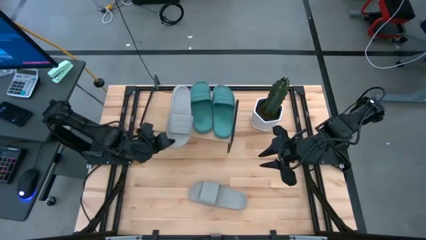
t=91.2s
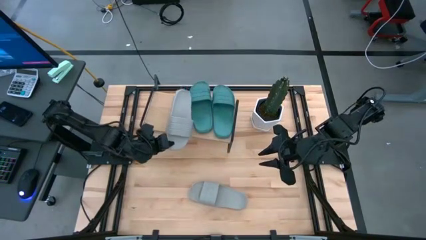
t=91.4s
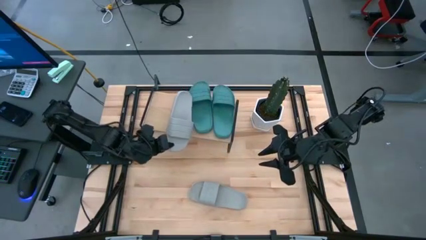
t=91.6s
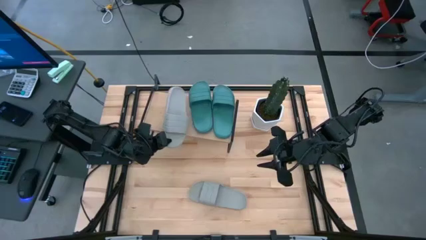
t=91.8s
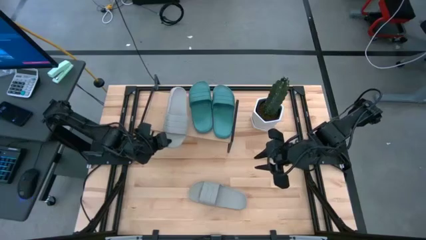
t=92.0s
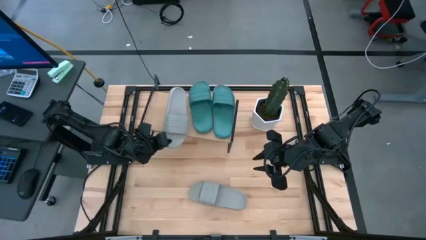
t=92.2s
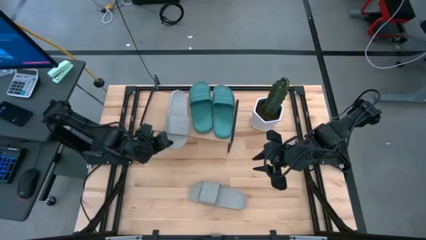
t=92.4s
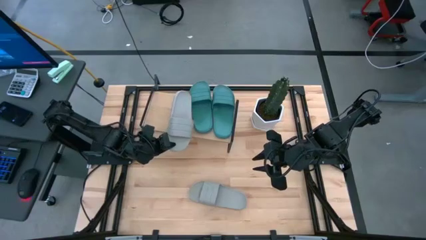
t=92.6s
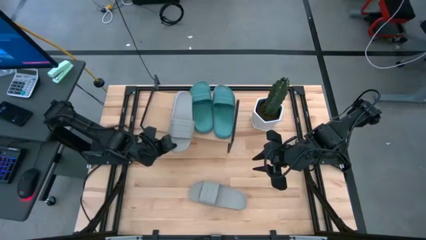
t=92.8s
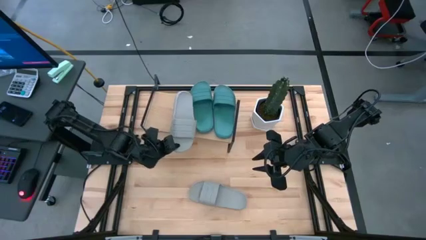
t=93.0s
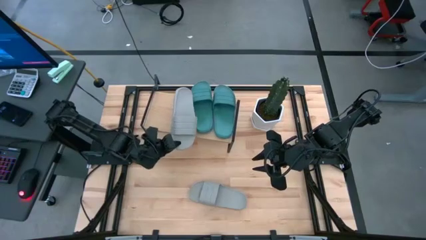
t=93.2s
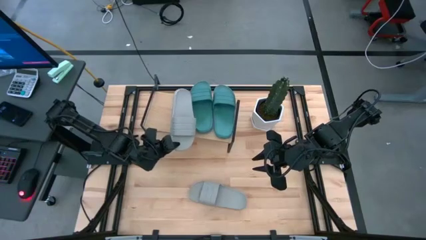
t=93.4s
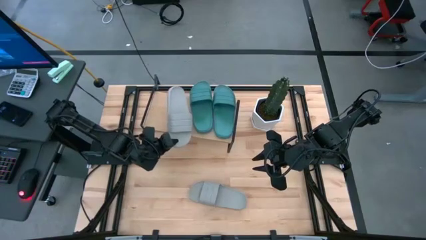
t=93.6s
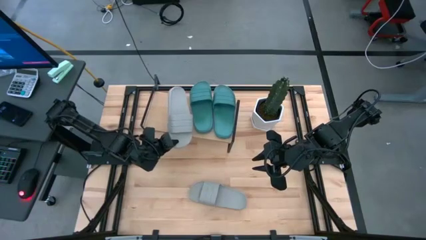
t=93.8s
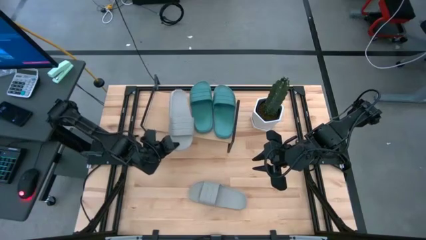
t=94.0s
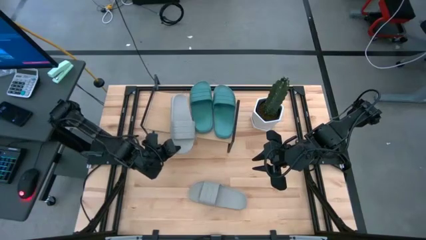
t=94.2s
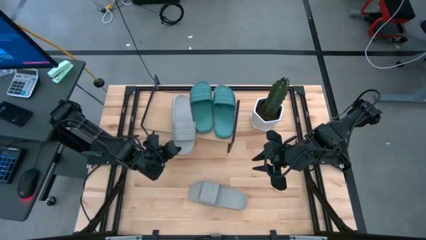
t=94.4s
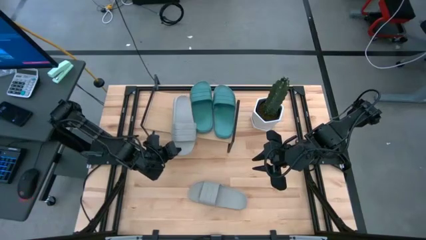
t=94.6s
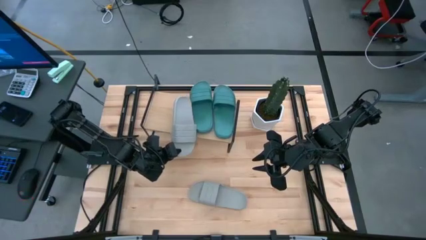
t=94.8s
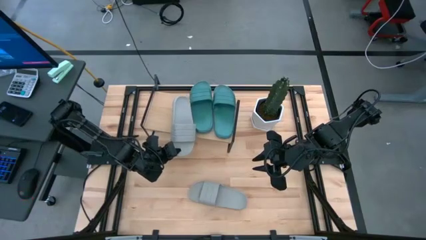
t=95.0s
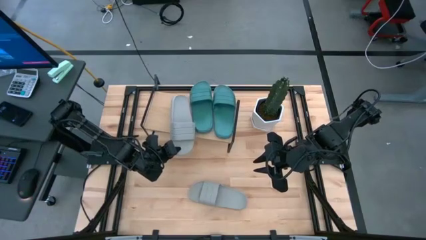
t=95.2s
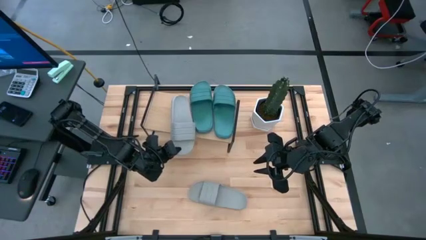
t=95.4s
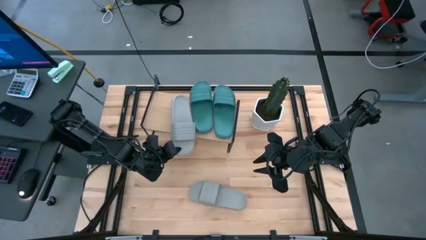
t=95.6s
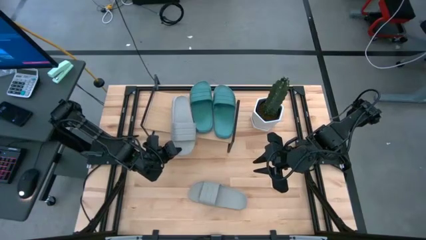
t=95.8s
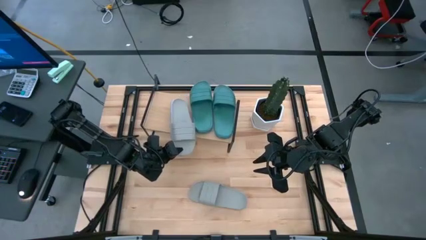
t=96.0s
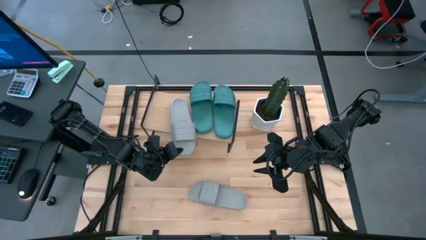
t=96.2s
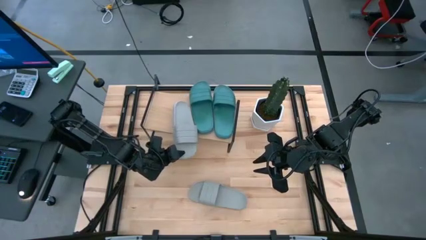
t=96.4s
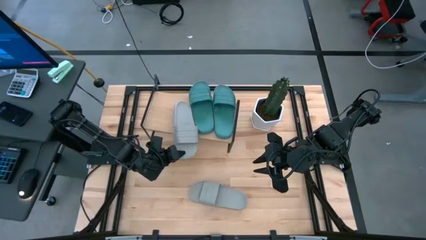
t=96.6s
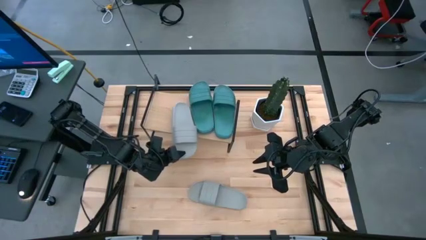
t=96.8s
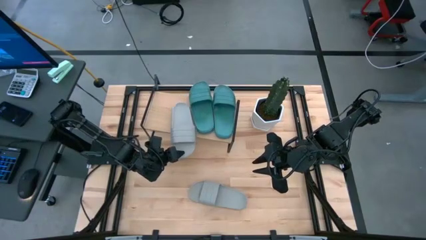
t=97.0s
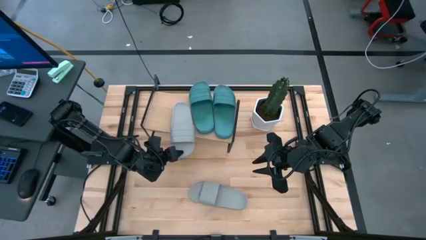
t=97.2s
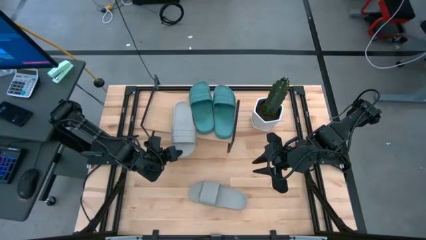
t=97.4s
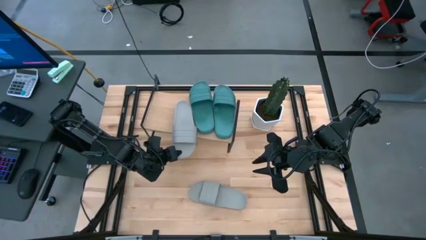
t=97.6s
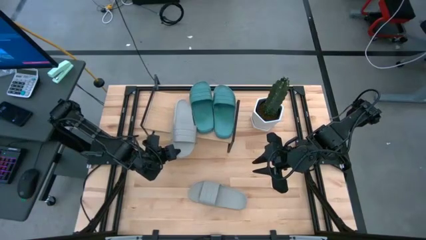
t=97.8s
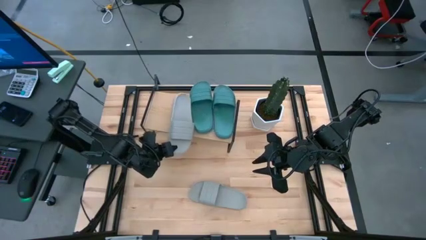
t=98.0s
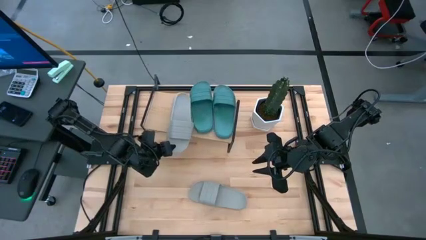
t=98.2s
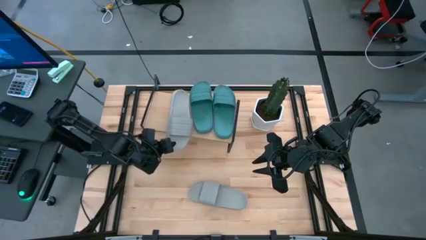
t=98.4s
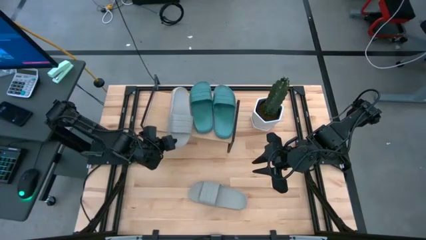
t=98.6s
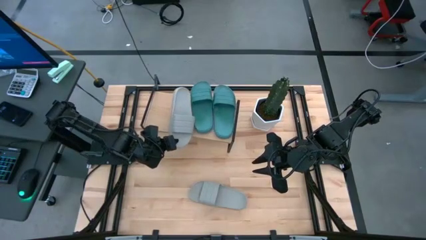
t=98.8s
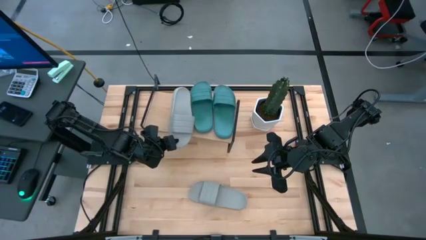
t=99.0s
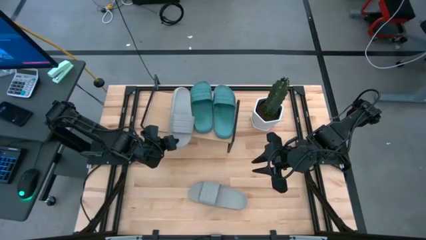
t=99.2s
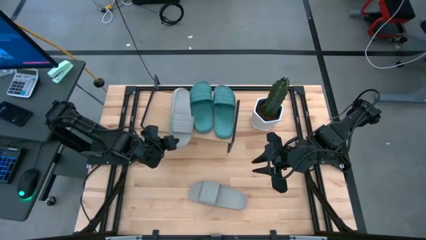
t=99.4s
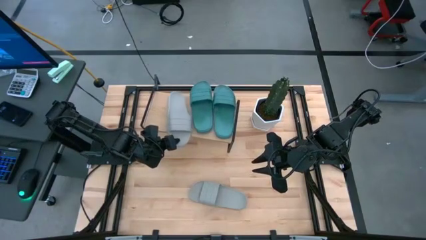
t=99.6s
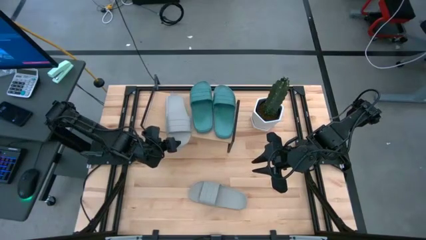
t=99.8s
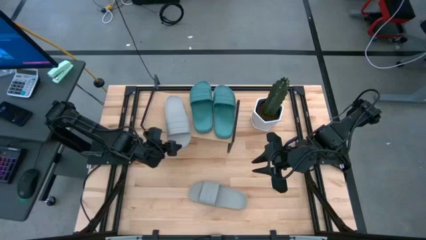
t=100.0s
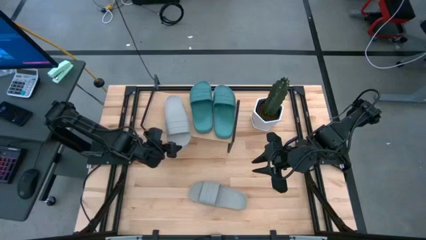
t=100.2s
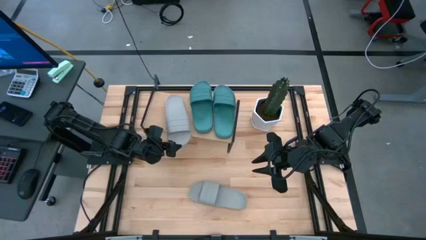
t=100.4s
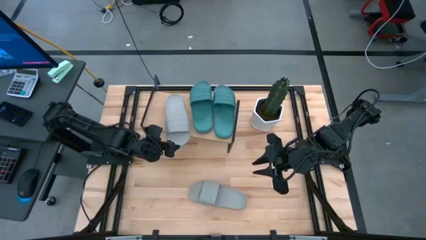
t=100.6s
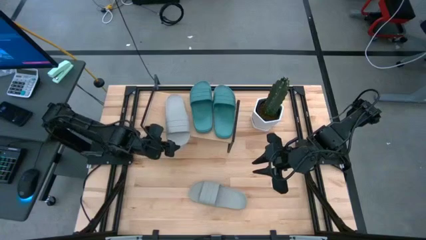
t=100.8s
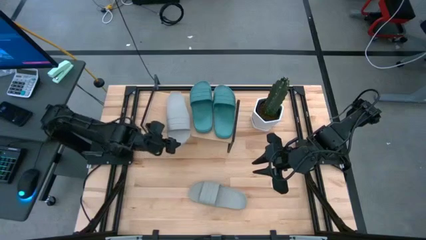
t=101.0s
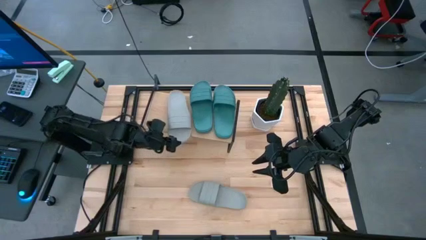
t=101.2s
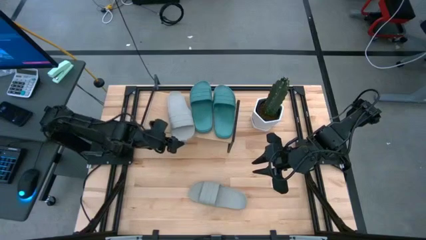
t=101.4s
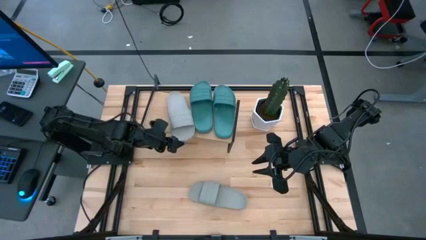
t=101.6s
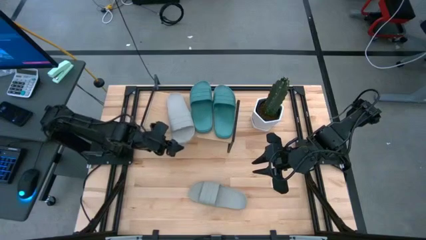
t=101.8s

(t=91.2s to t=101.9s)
Task: Pick and place slides into the shelf
Put the gray slide on the shelf

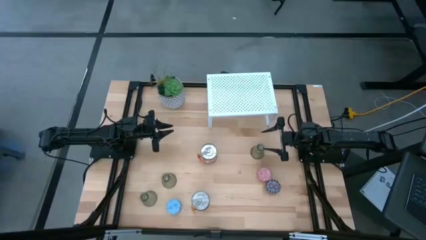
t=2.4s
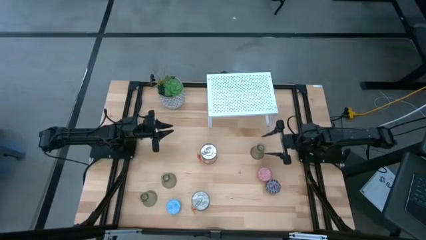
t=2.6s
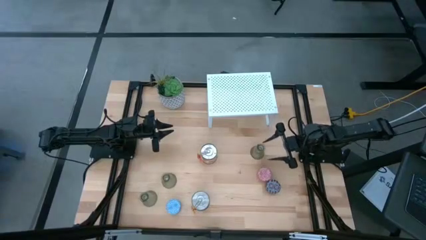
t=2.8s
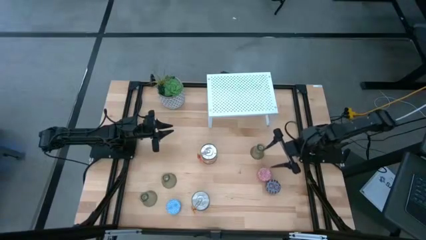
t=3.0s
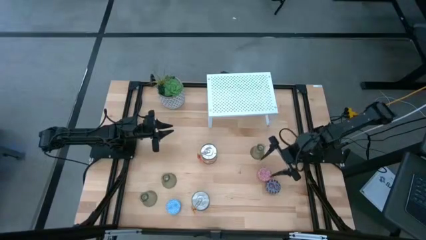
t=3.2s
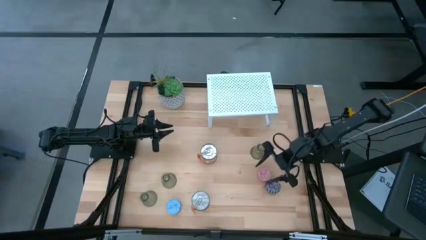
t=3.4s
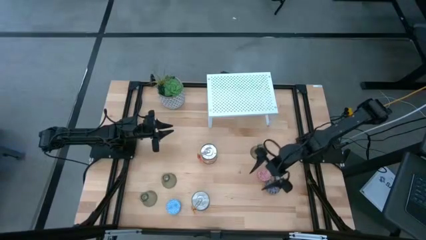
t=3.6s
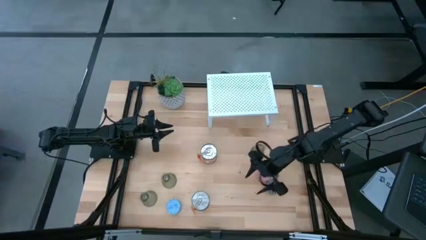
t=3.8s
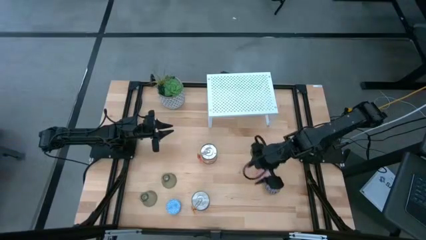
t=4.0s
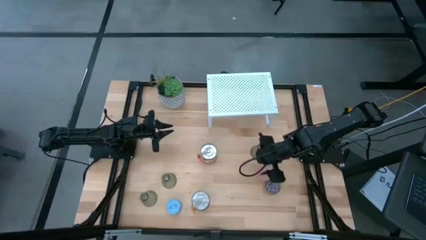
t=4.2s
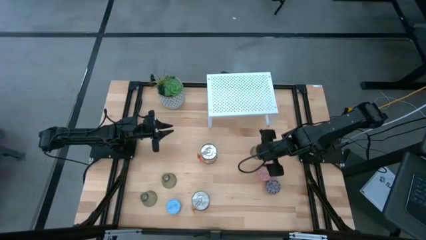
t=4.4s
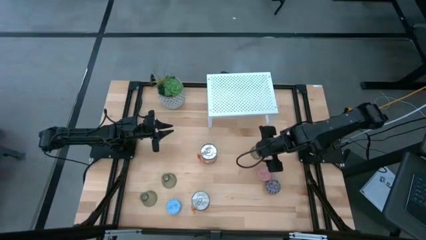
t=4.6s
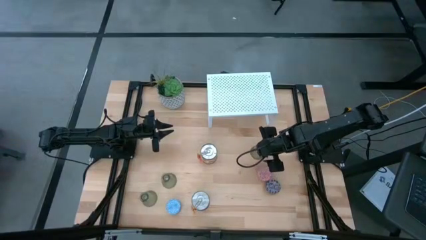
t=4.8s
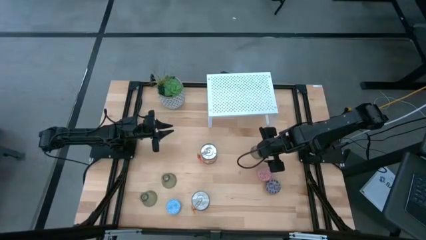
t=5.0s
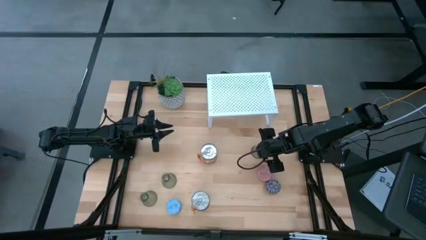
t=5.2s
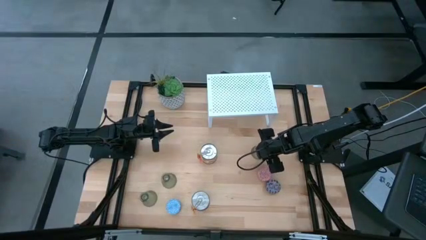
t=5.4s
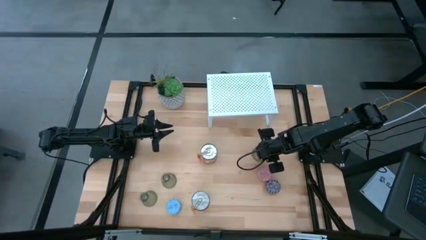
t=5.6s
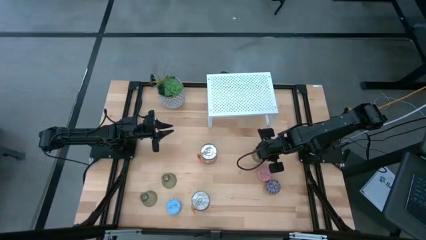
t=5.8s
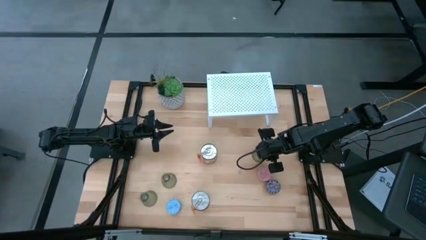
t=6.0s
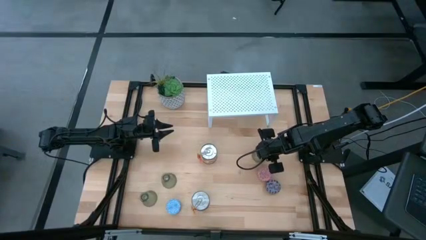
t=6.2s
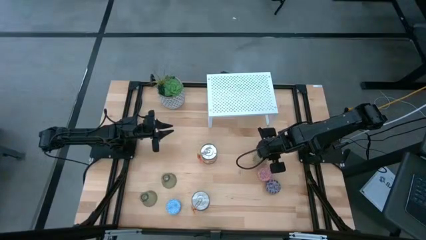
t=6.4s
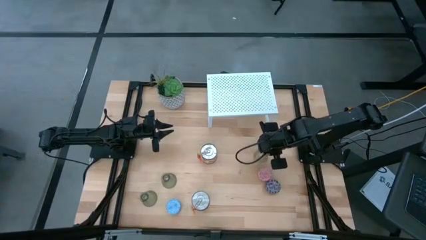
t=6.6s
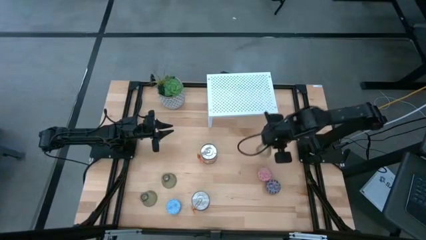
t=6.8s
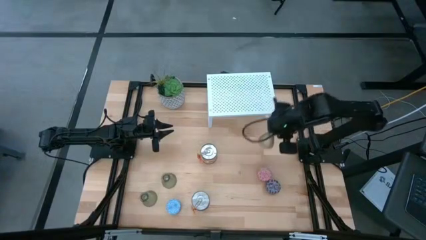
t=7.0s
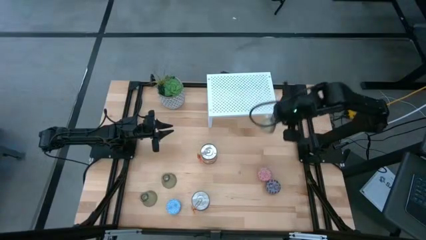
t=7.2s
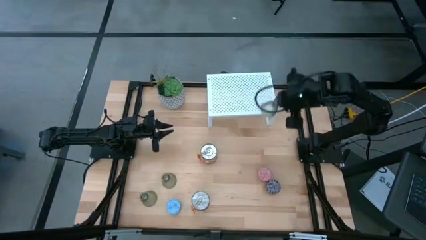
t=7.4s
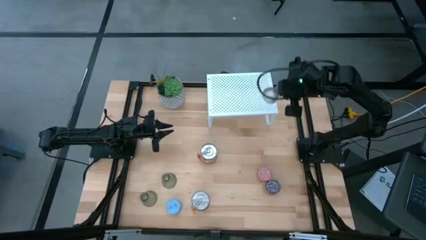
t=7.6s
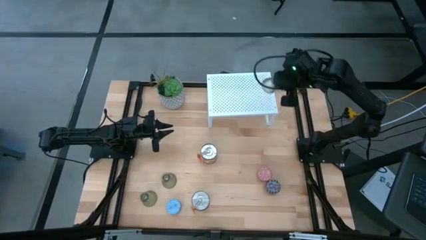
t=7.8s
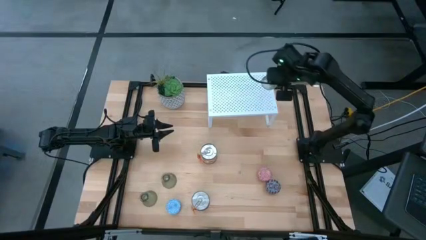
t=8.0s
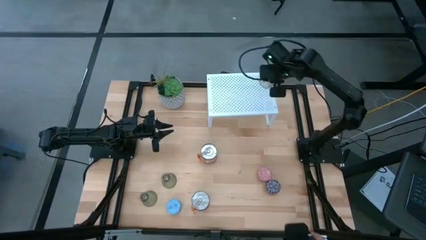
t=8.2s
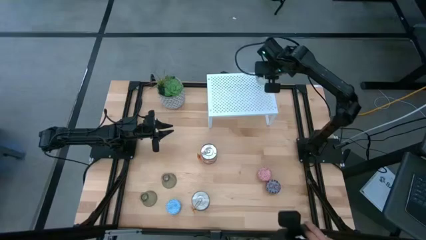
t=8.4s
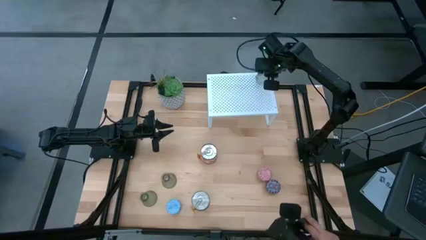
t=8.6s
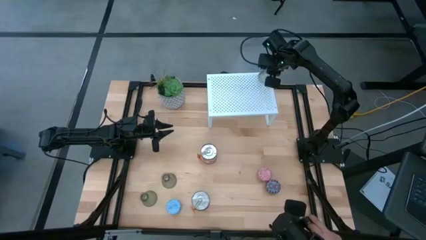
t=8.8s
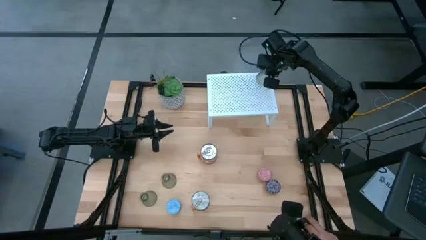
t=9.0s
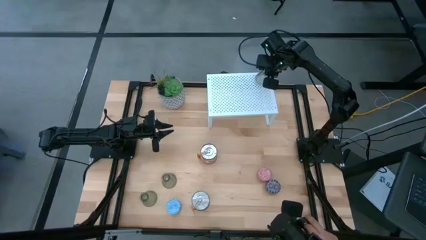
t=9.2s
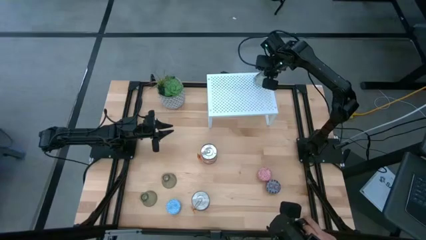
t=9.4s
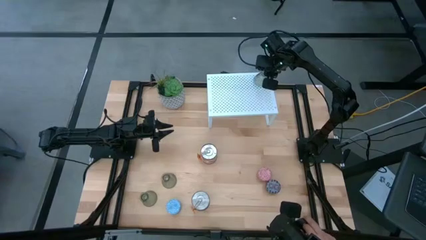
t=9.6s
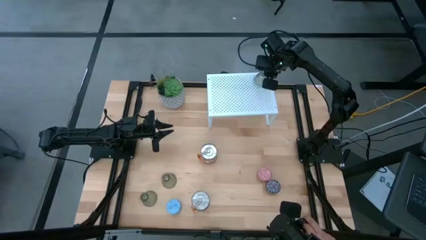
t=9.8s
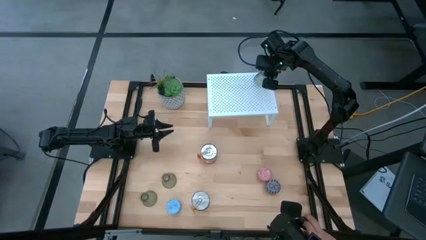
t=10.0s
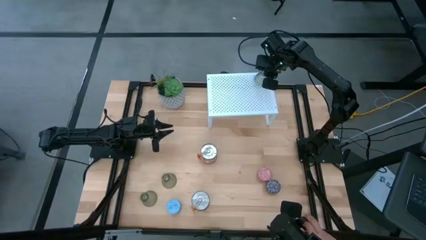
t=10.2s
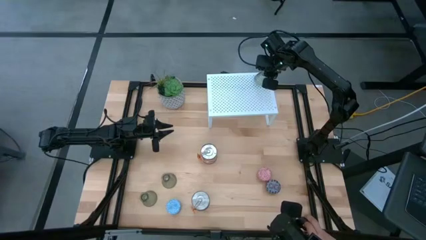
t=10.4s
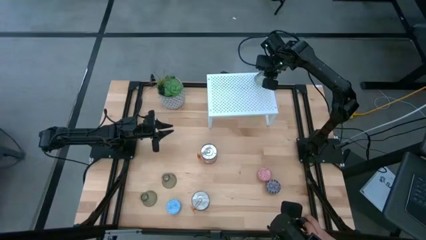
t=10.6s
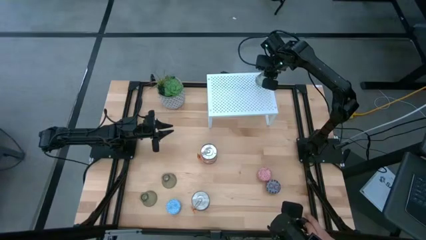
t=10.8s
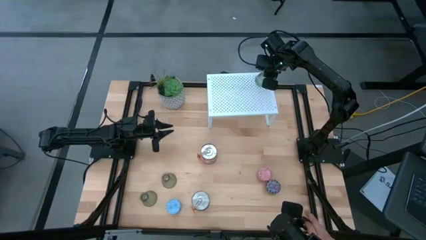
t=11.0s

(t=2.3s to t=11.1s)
Task: Pick & Place candle stick holders
Put the top right green glass candle holder on the shelf
